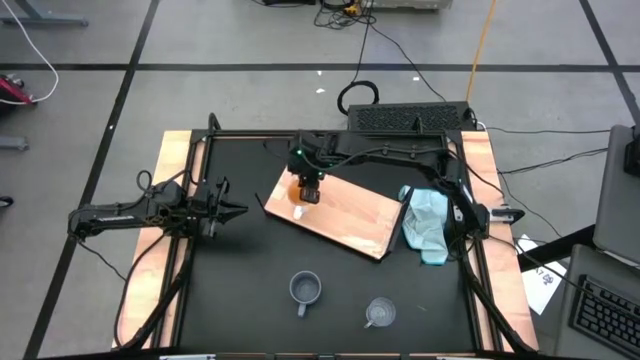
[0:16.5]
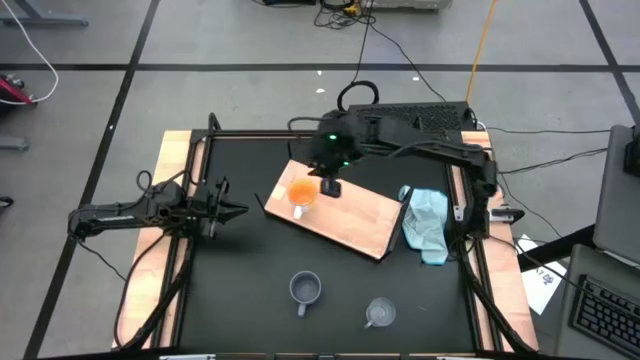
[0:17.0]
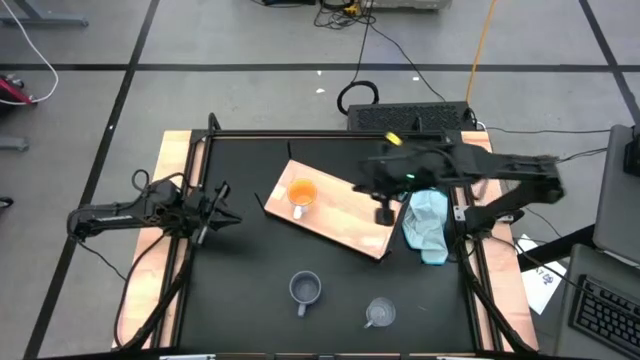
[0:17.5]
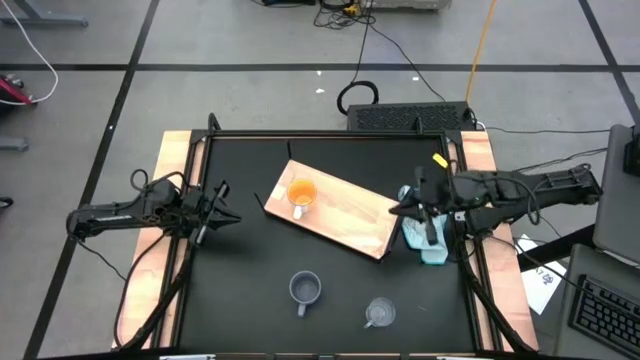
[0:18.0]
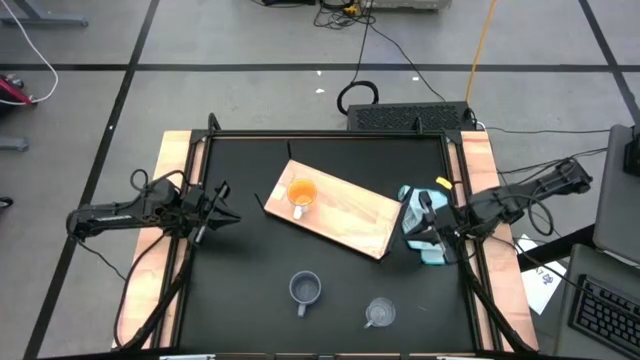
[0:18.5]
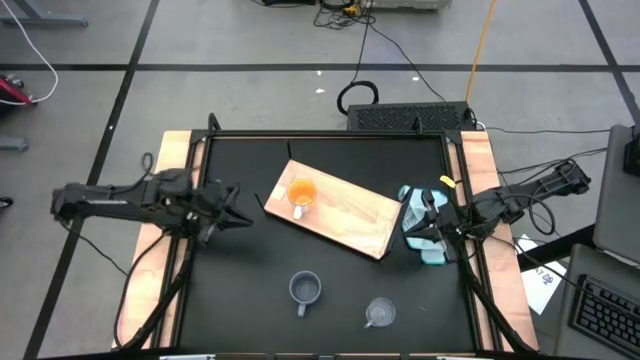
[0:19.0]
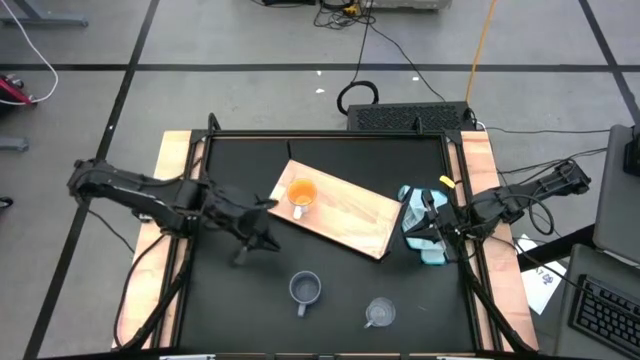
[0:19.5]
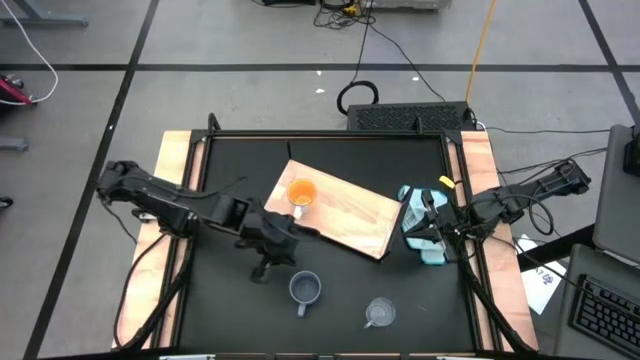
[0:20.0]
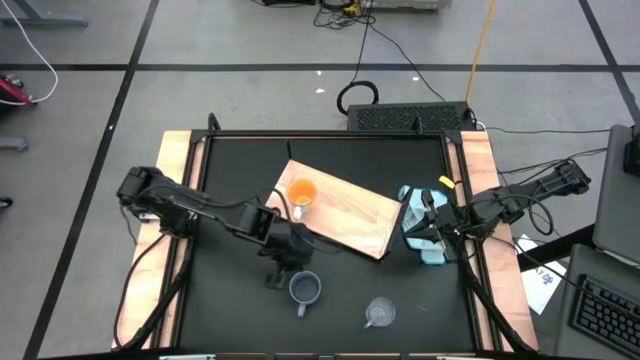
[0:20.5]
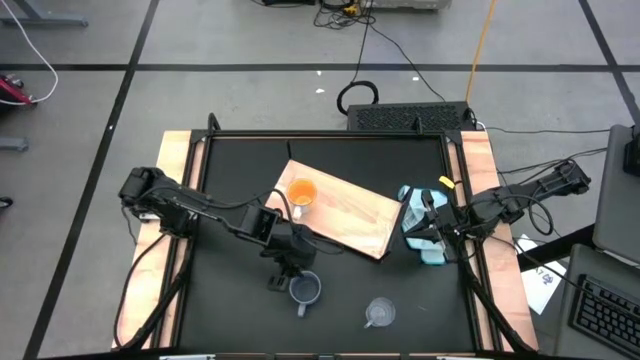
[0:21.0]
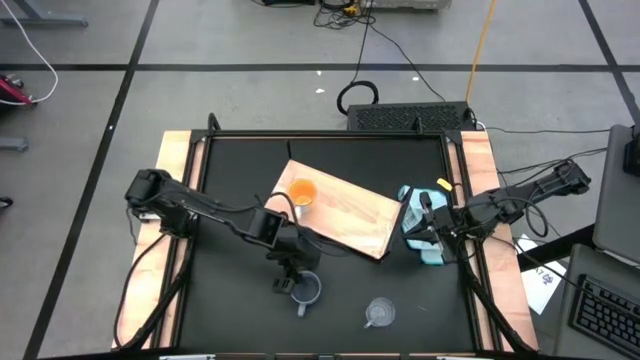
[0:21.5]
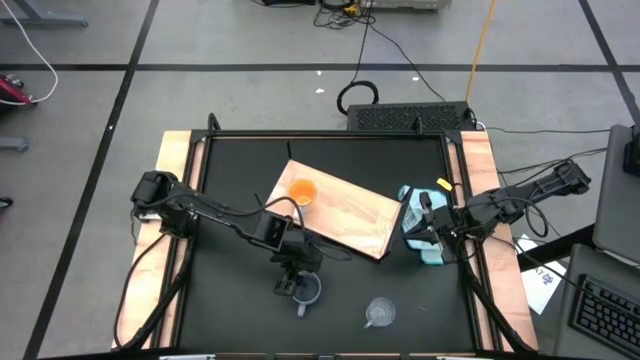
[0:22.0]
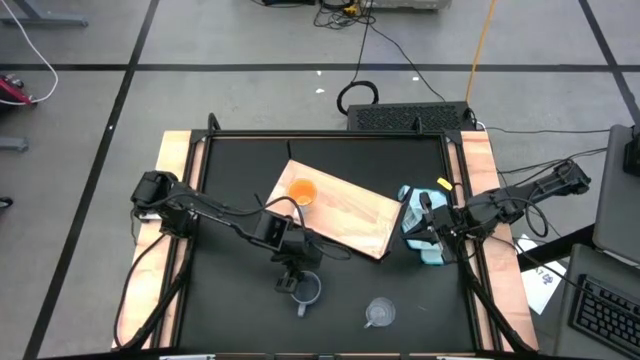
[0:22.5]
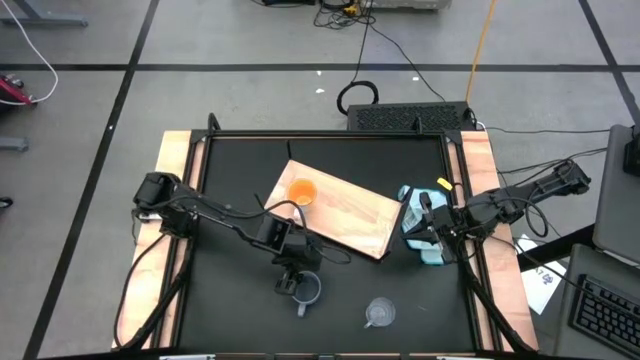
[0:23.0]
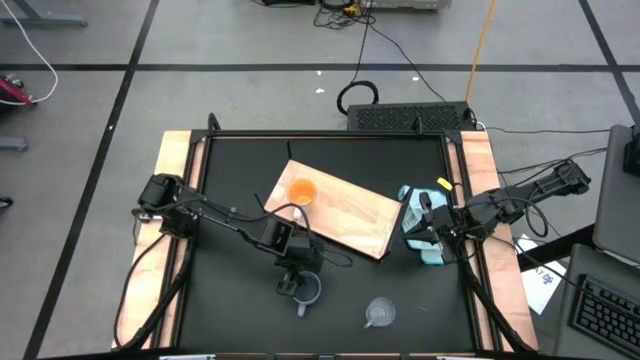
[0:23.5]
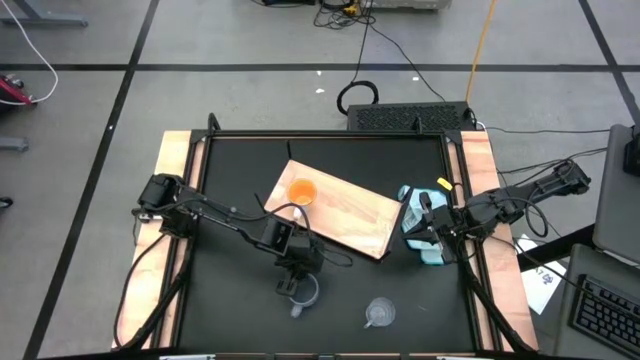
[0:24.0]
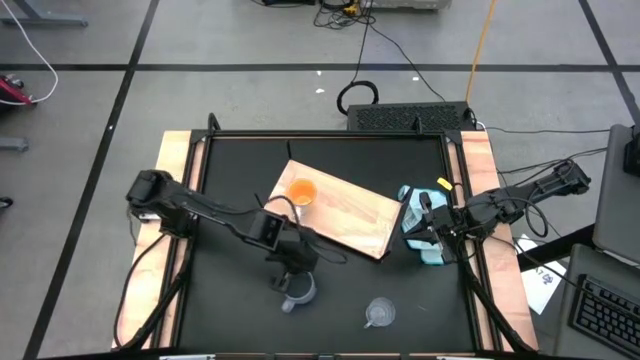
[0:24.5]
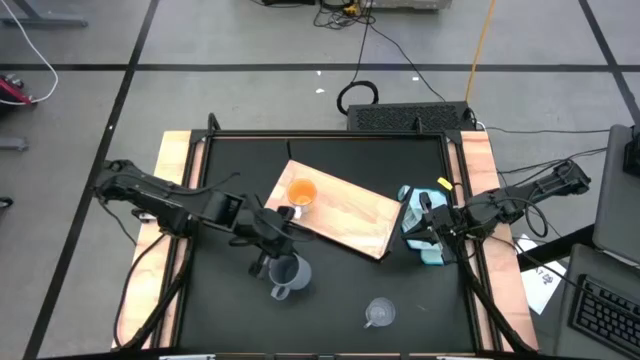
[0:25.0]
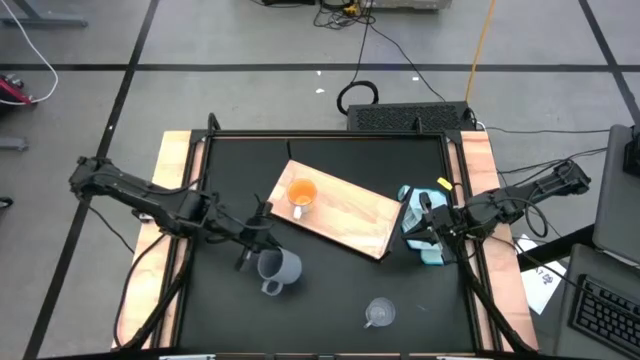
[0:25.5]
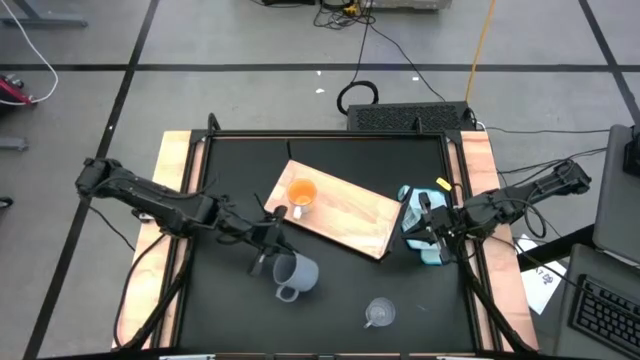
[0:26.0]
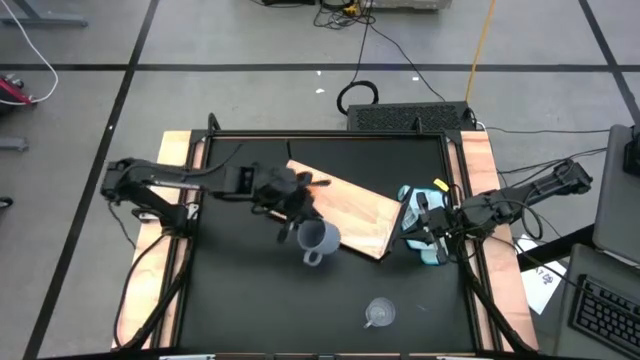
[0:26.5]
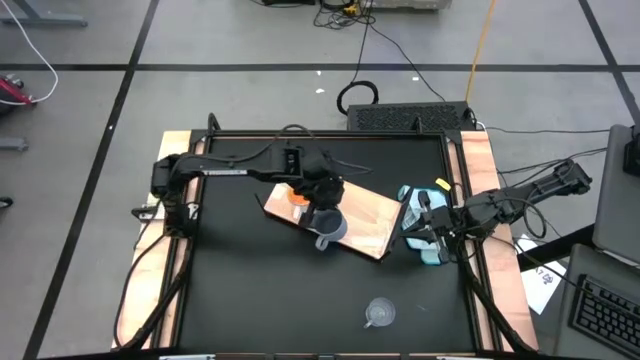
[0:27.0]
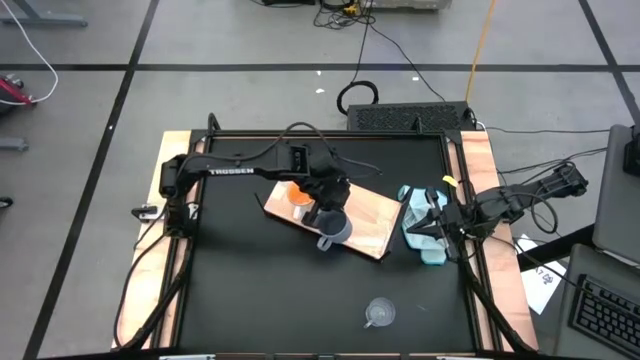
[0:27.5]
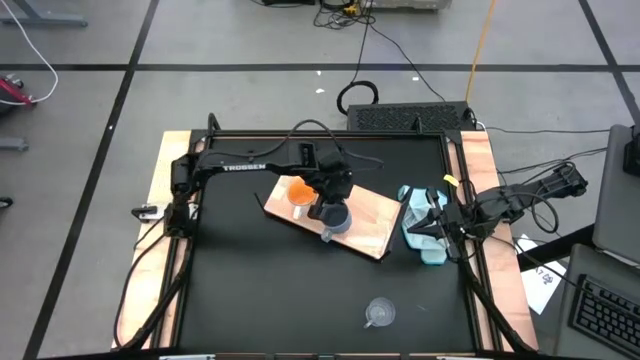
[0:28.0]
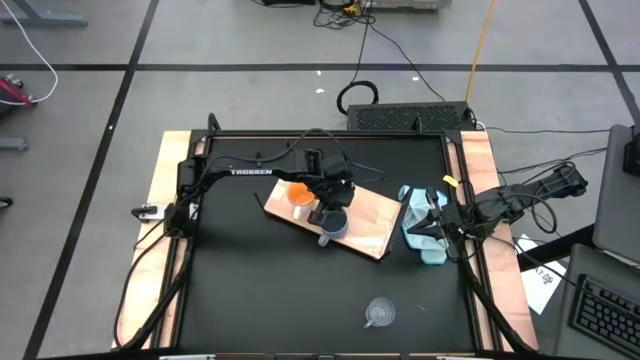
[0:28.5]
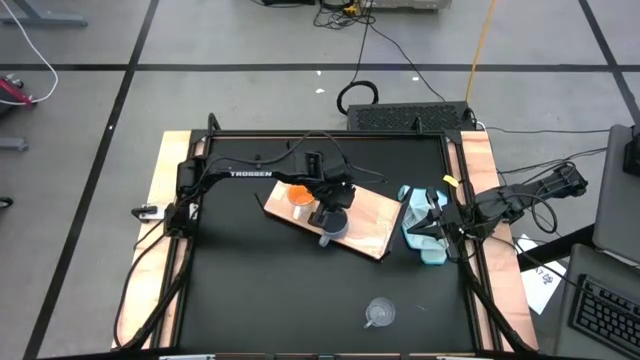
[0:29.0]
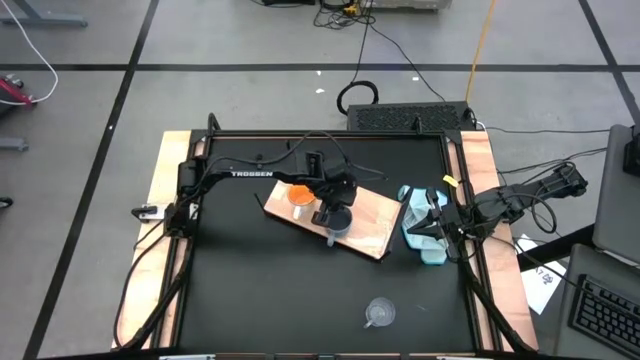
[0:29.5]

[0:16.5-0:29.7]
Task: Stack small to large cups/mugs on shelf
Put the gray mug on the shelf

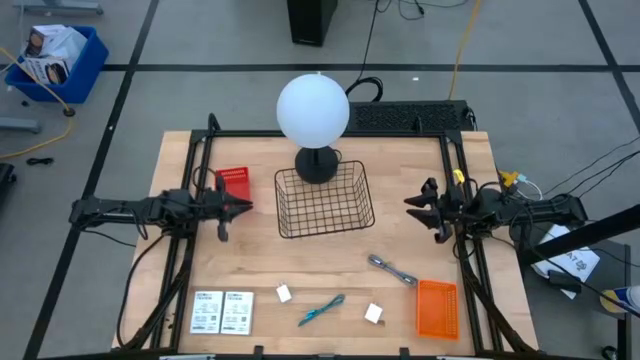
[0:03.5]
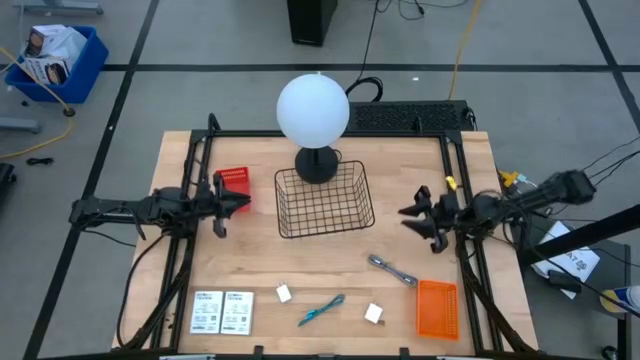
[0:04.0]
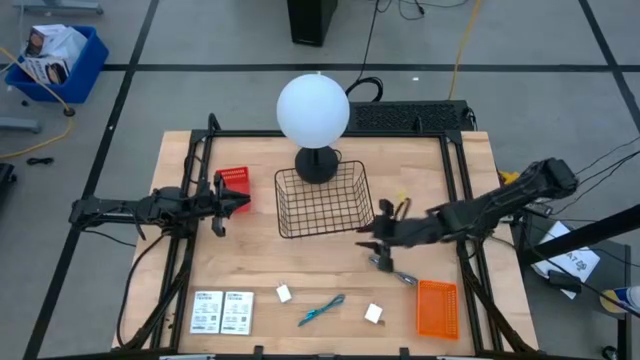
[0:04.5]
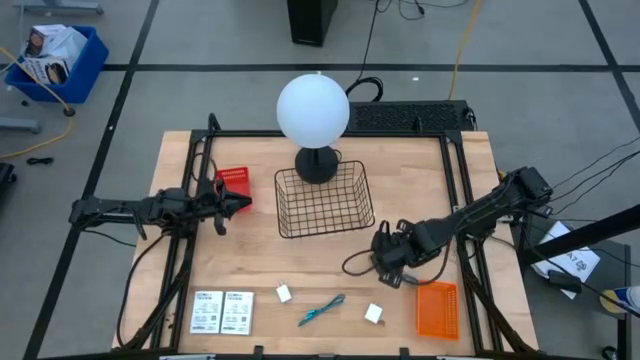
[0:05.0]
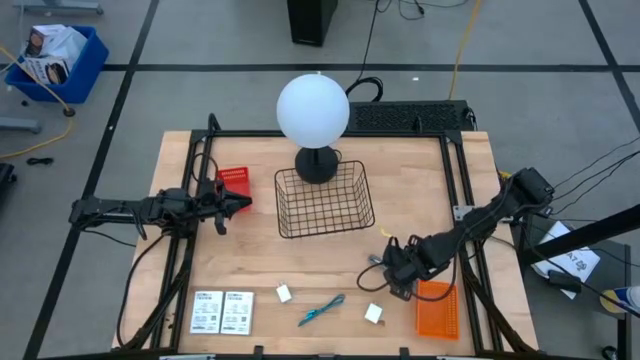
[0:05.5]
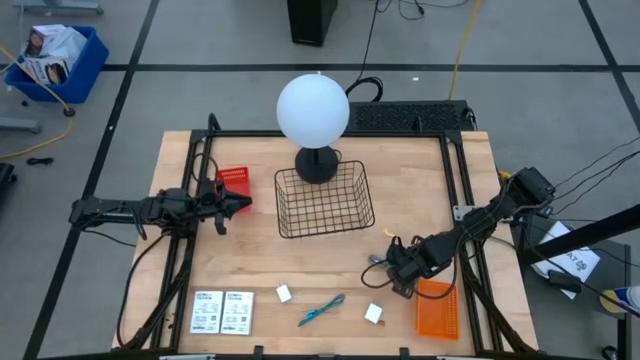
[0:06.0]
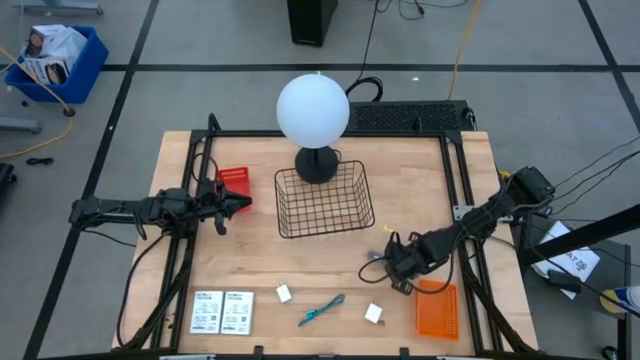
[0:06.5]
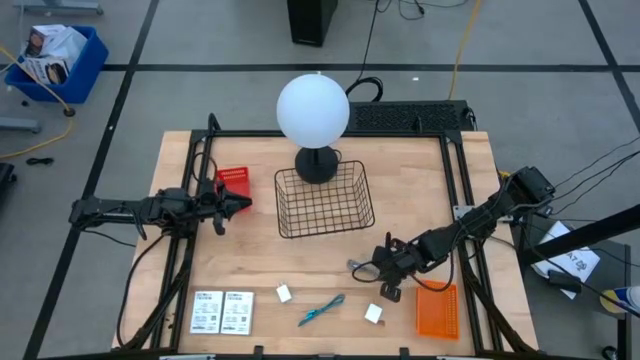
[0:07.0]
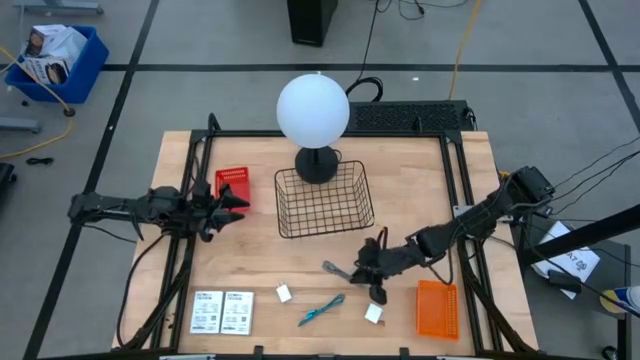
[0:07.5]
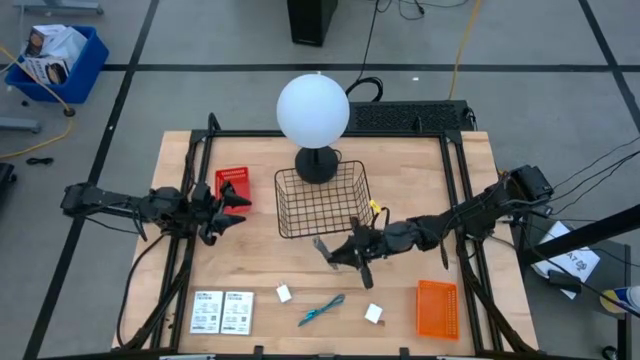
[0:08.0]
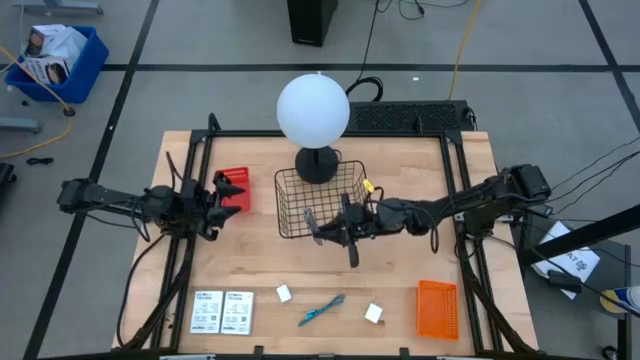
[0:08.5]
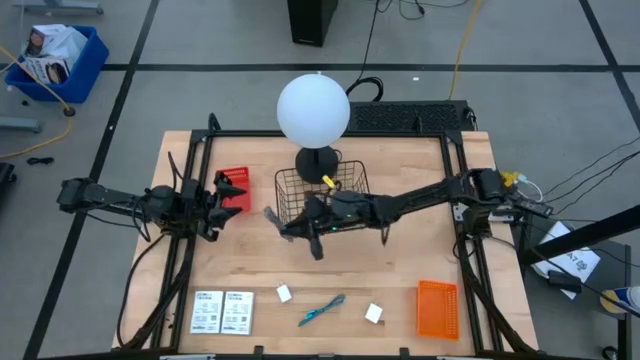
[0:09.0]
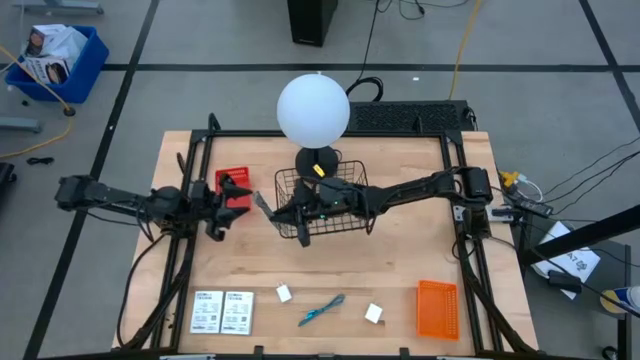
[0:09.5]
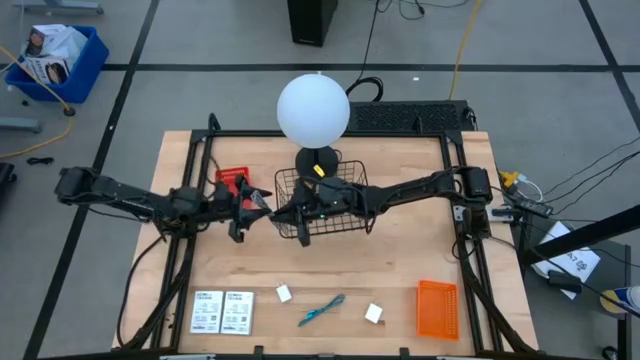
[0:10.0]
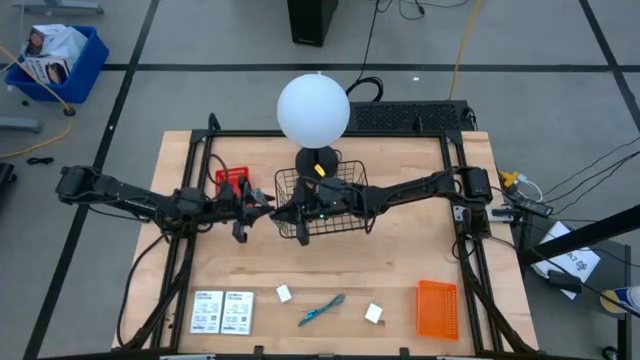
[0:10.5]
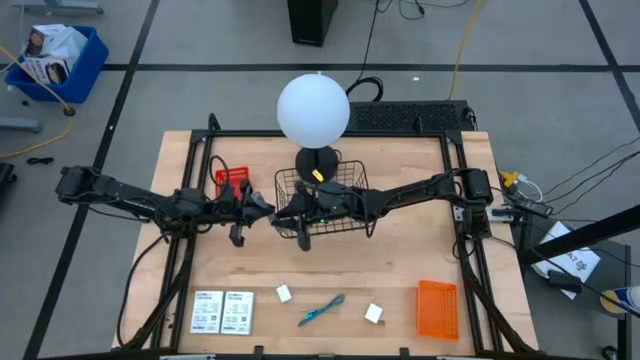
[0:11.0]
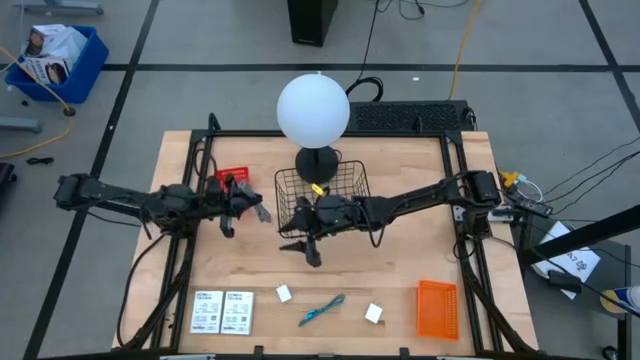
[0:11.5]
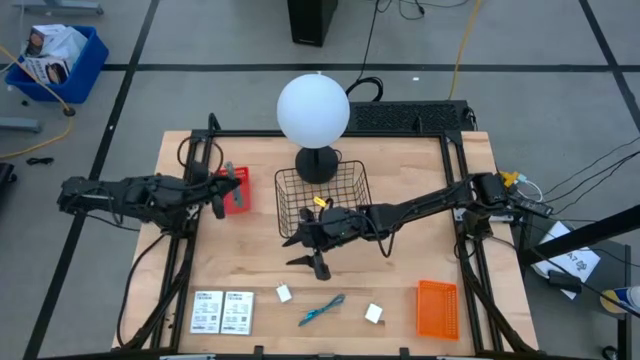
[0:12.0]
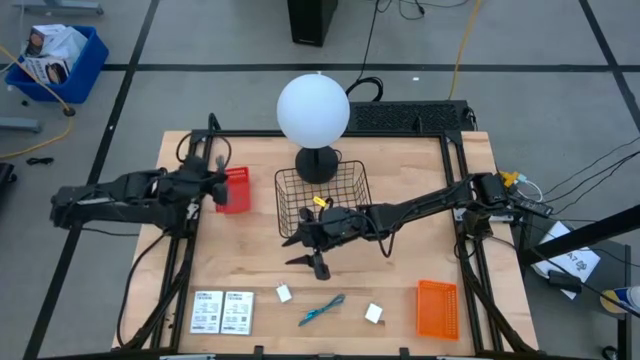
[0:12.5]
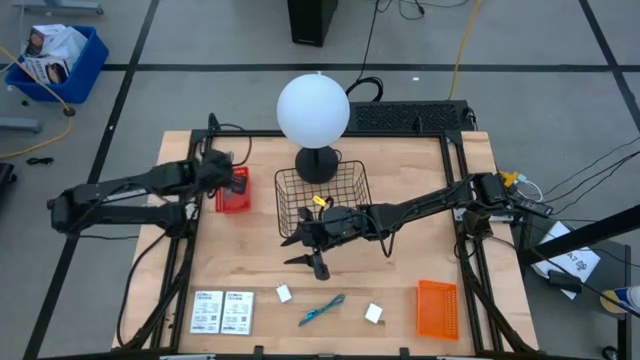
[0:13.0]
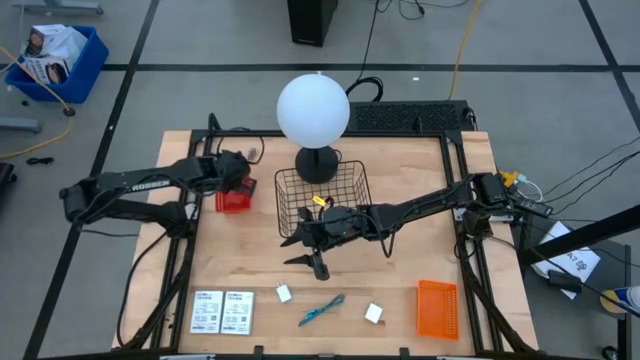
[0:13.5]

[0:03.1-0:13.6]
Task: Pick and place items into bin
Put the gray charger cable into the red bin
